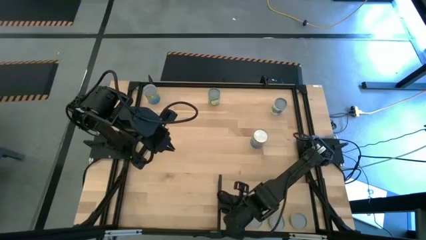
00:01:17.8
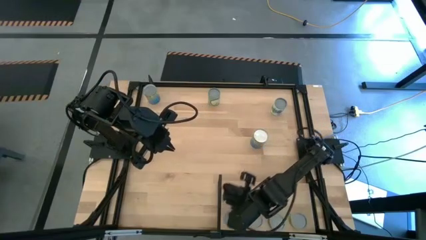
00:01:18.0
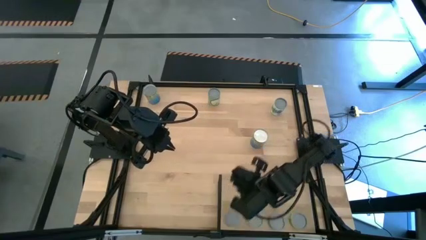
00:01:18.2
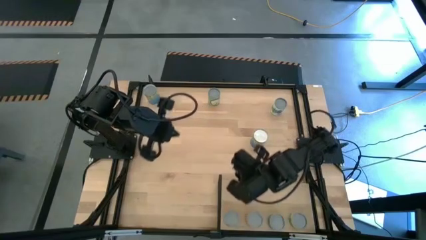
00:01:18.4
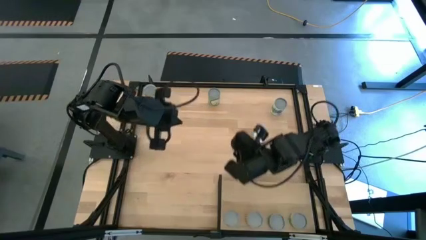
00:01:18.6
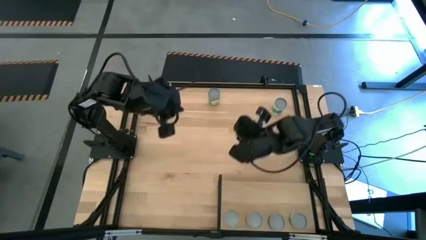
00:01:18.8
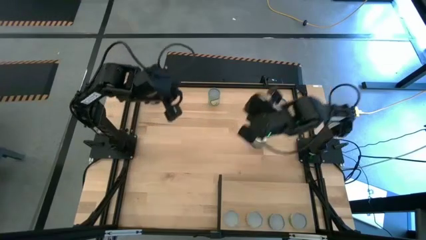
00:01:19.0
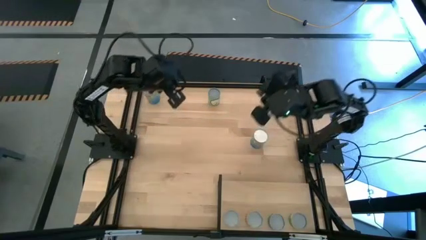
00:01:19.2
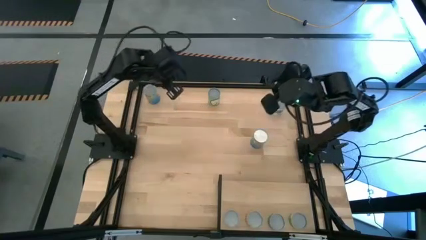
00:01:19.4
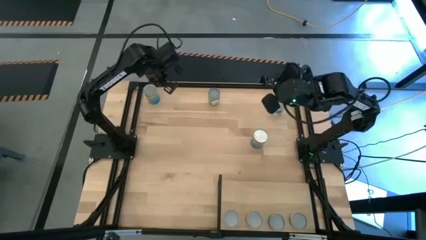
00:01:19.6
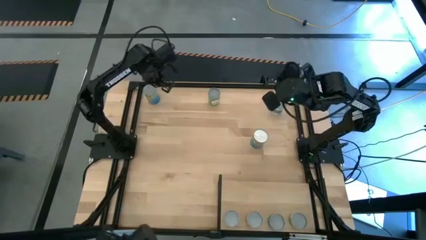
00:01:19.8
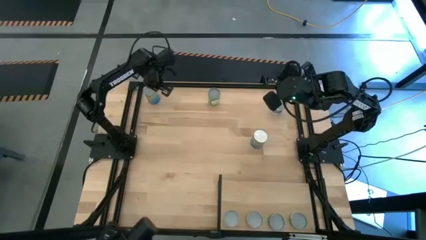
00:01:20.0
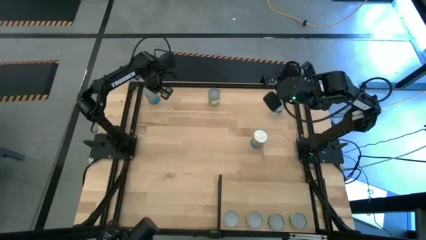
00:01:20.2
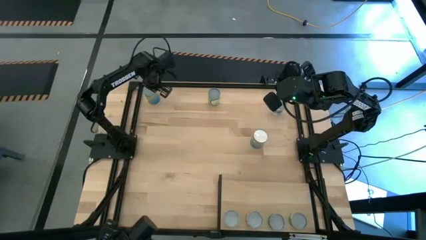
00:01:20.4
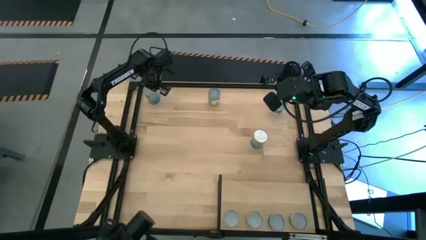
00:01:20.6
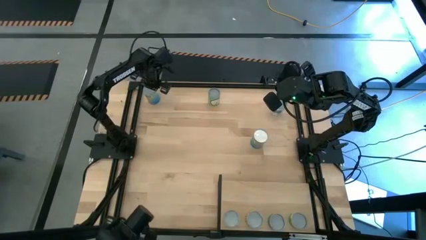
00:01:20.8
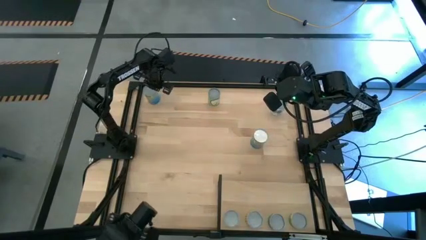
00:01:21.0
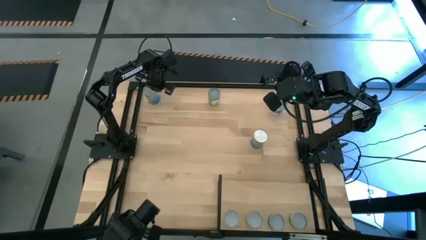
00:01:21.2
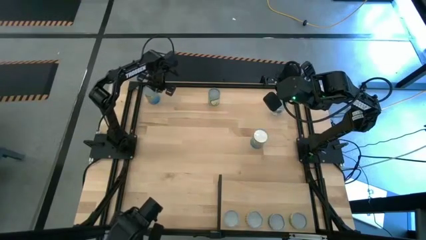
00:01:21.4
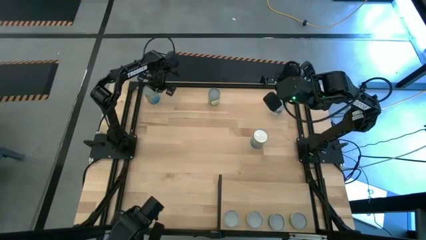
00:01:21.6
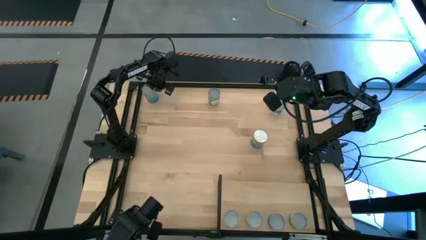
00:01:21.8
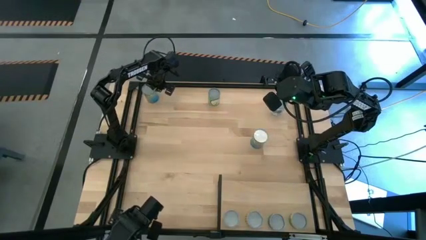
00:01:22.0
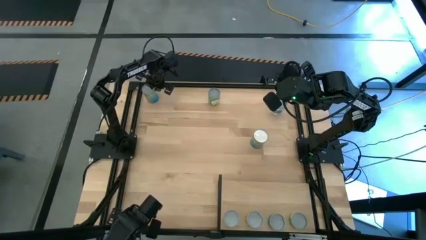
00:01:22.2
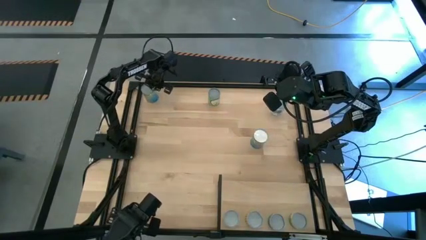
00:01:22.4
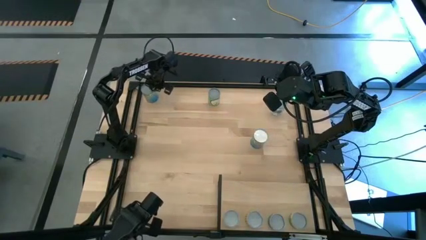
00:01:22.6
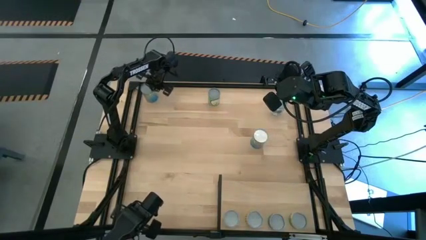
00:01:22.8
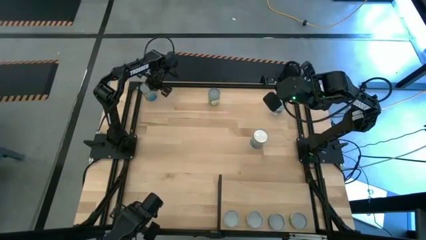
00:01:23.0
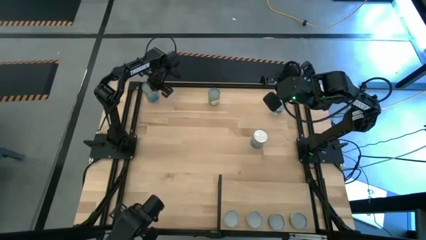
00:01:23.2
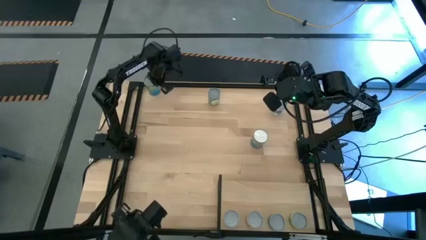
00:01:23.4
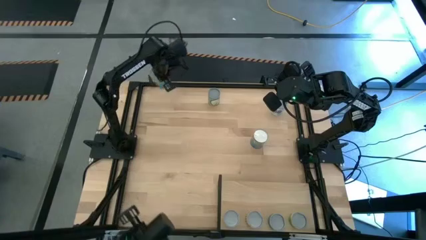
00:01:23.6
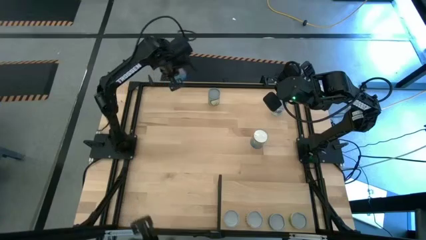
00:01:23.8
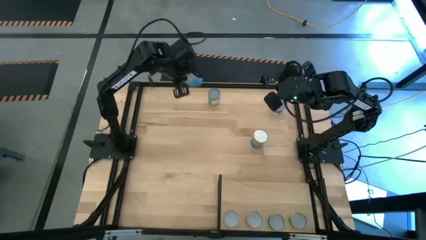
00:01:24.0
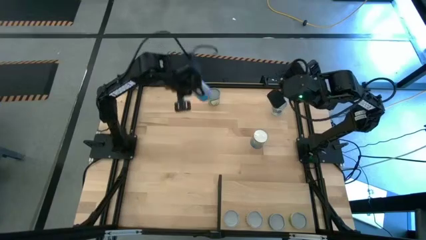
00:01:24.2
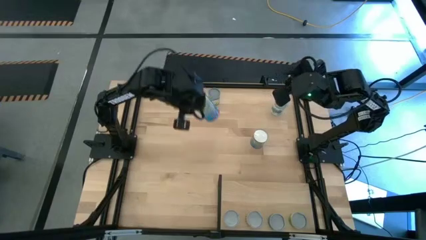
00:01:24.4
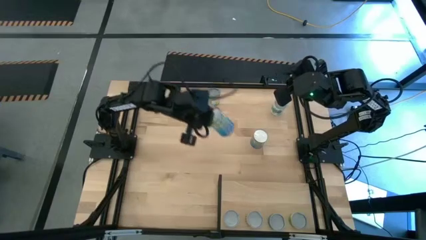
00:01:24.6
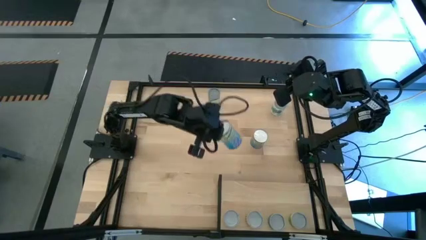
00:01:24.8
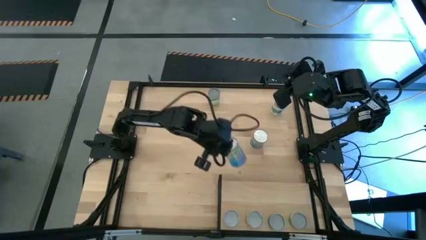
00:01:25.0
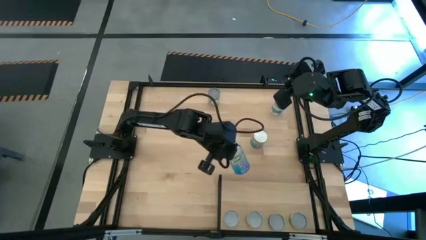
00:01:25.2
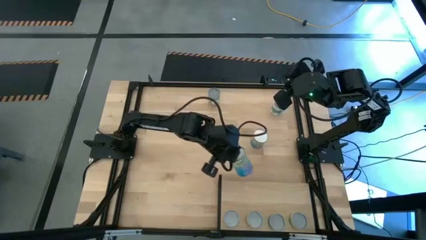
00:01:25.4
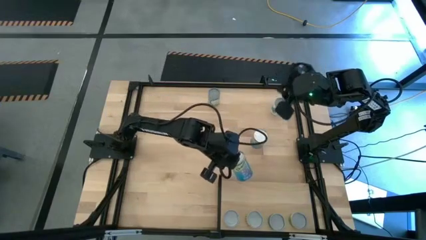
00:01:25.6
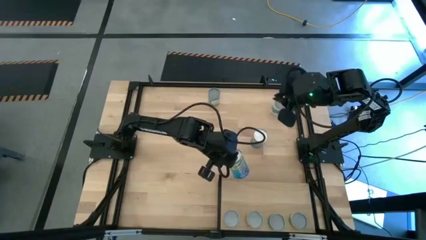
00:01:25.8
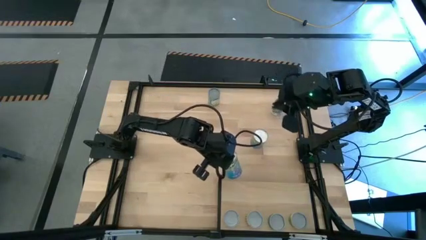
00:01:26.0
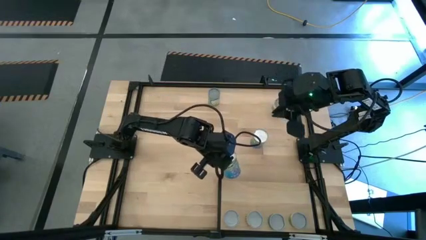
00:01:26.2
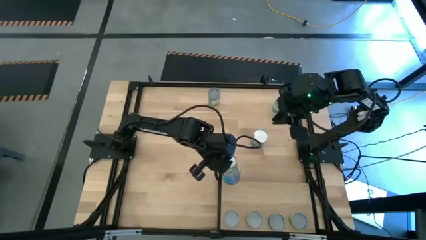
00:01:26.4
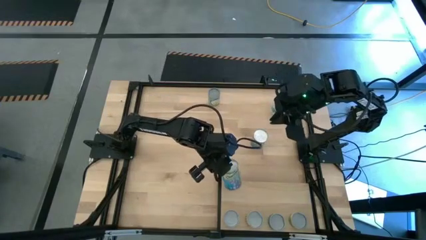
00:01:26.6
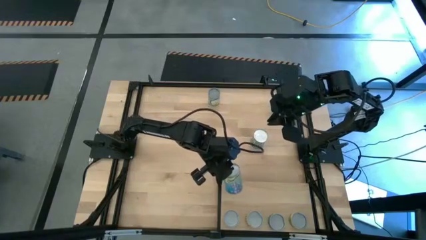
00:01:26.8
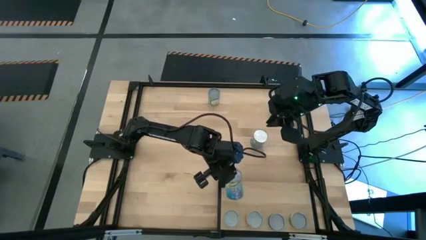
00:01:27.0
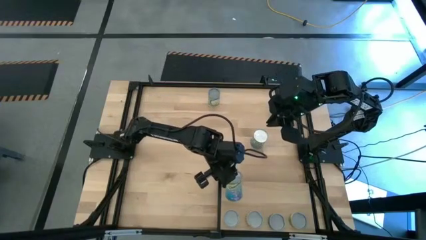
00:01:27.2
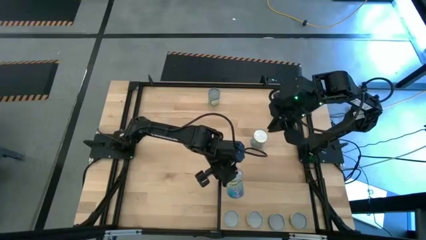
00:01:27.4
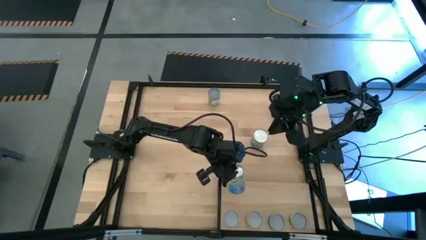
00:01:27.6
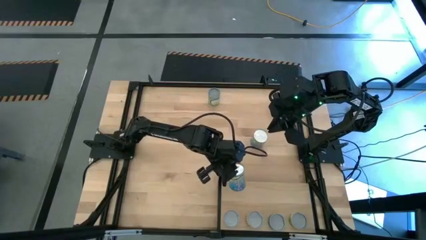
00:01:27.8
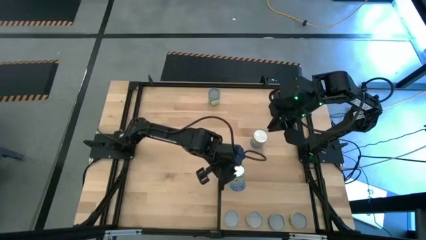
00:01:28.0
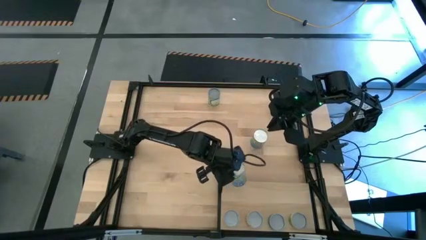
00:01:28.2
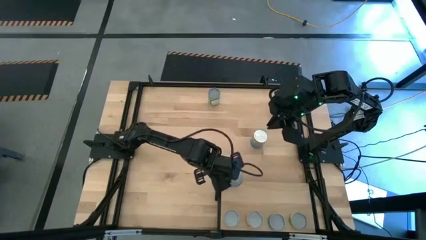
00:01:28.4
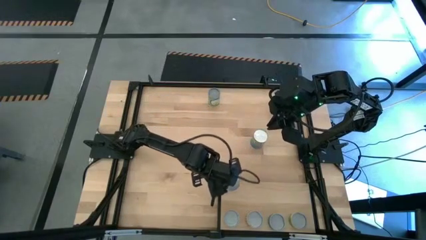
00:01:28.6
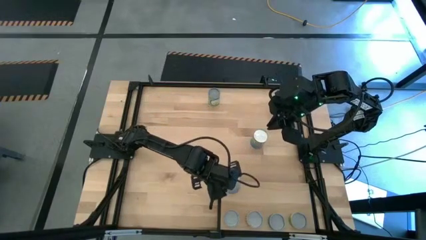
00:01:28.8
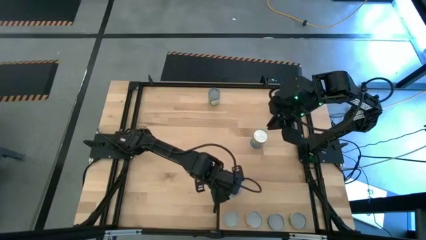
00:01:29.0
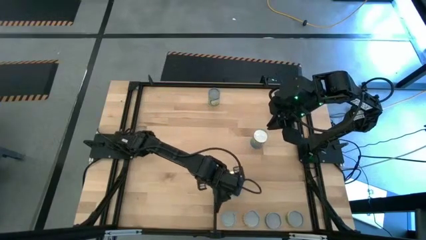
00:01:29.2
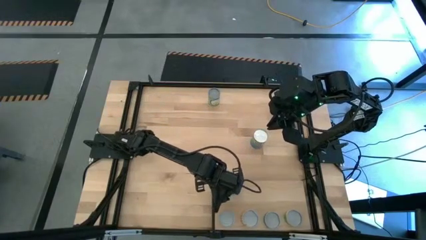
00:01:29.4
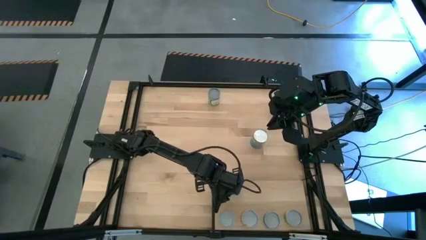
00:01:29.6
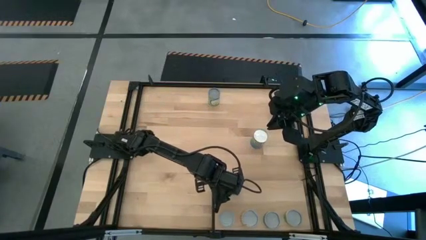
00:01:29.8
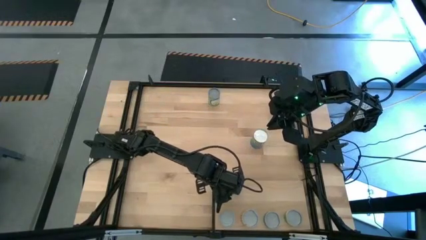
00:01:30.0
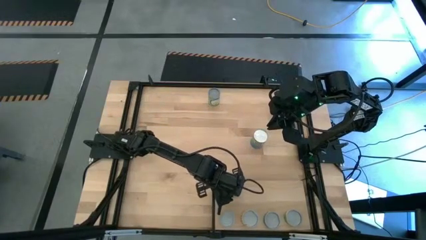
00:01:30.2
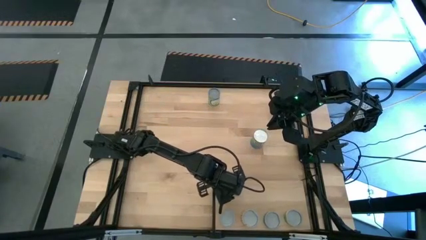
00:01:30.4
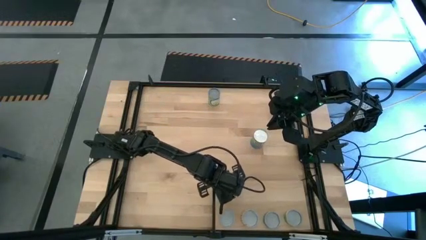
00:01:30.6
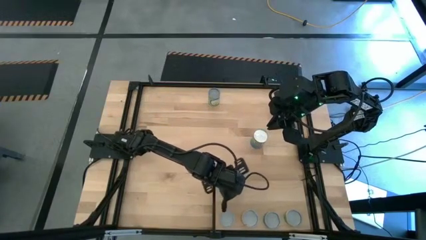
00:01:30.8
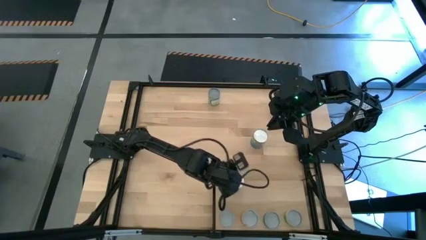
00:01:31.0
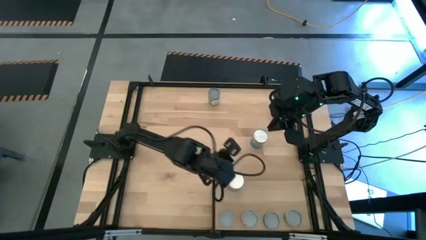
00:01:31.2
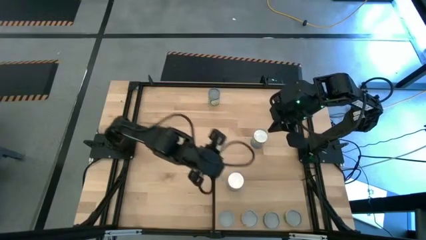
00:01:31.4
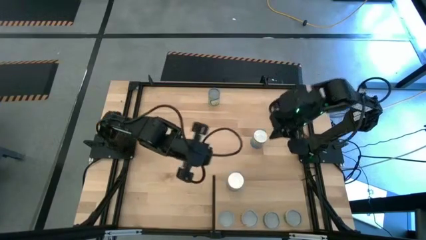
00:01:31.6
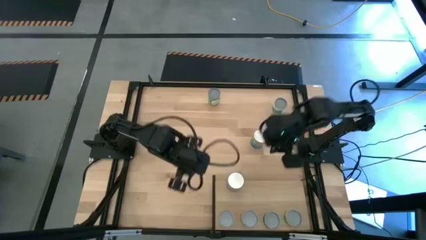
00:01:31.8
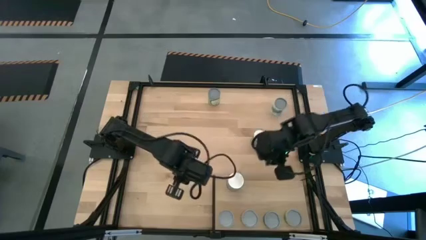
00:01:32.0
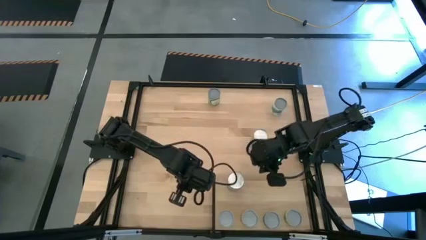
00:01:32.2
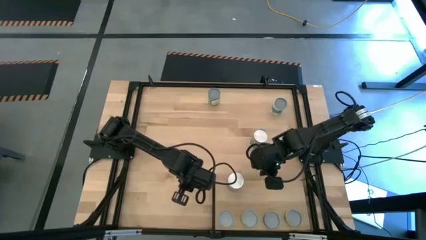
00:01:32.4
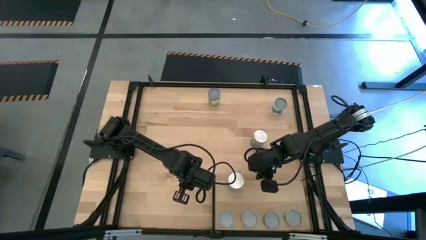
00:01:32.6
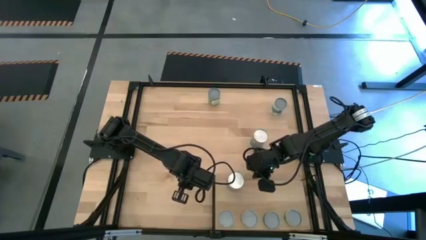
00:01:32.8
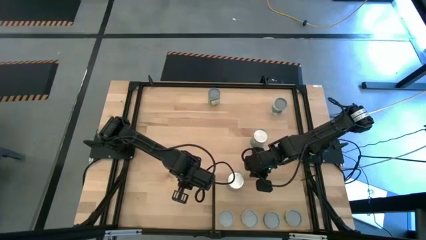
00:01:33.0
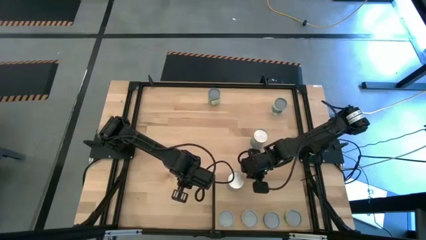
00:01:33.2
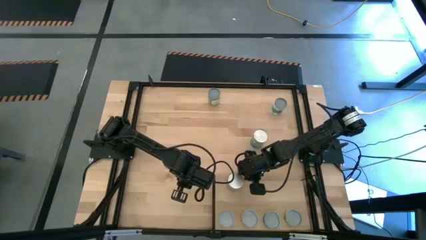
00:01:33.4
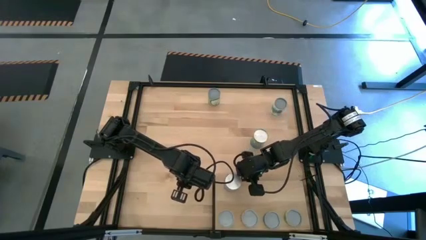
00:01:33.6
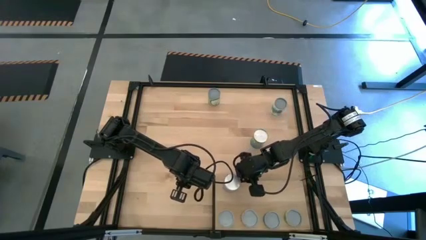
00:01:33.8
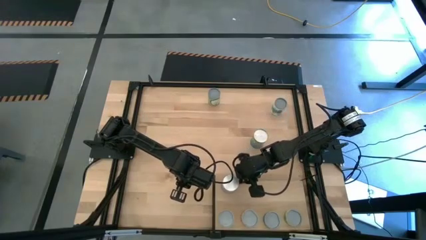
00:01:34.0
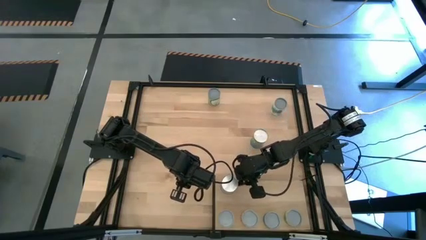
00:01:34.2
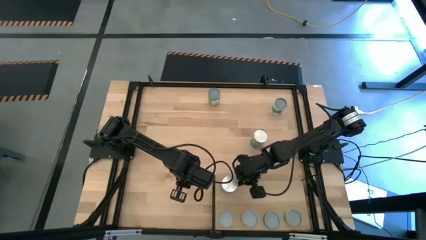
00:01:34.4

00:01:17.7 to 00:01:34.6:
Task: Pick and place cans onto a shelf
Put the left canned cherries on the shelf
